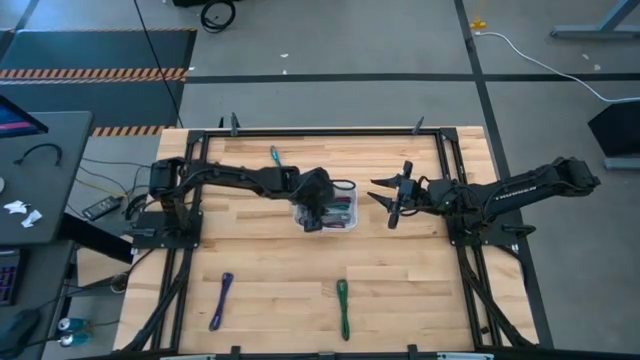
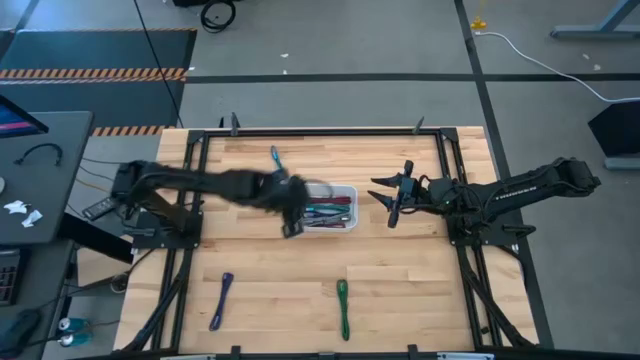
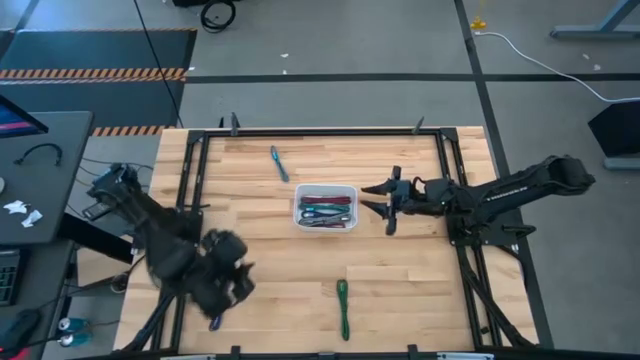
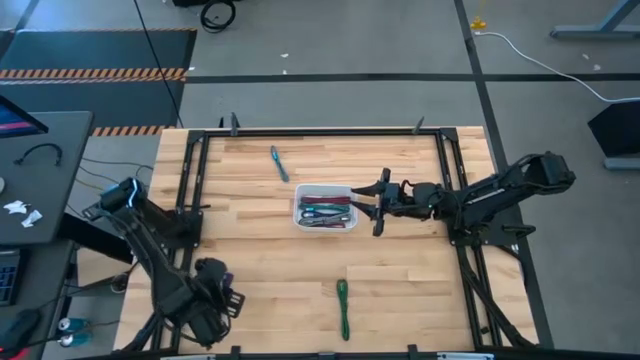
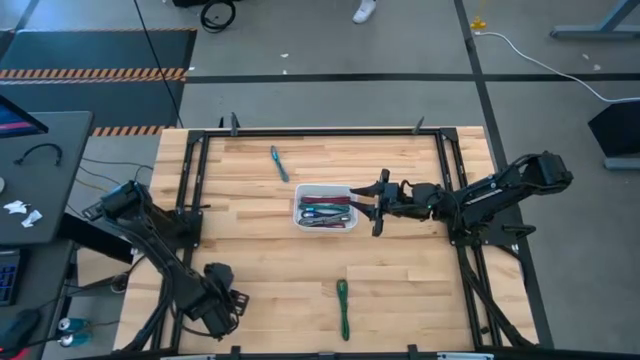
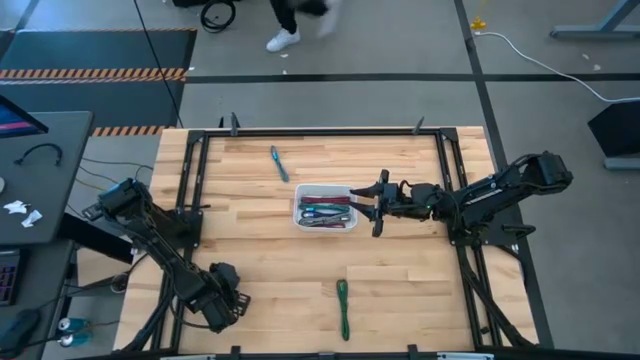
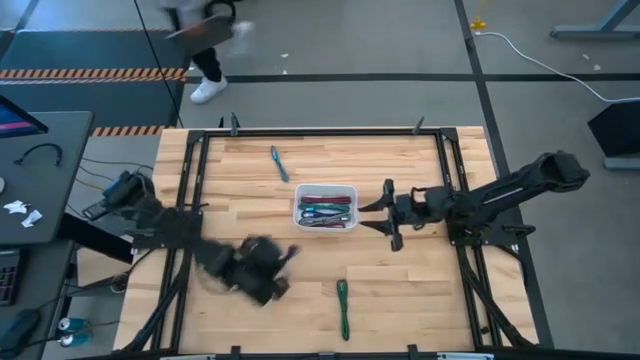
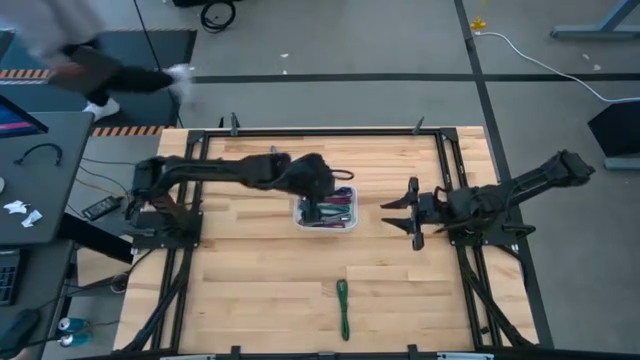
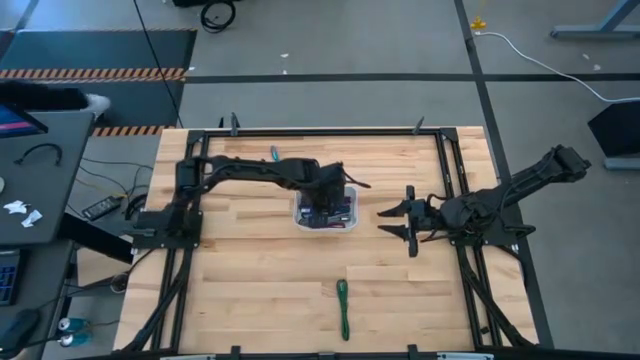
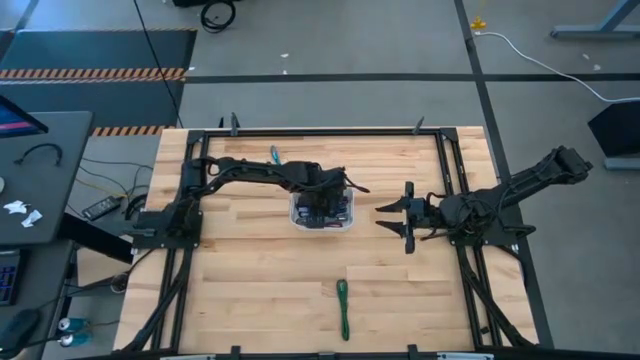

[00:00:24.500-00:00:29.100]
Task: Pick and place USB-C Cables
Put the black and violet charger cable into the white bin

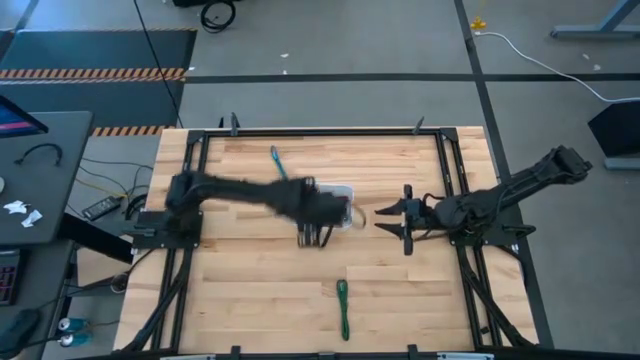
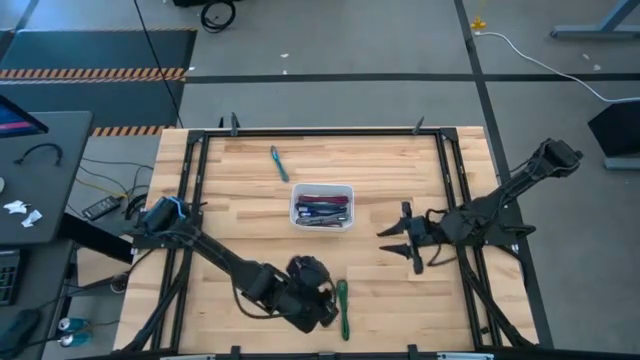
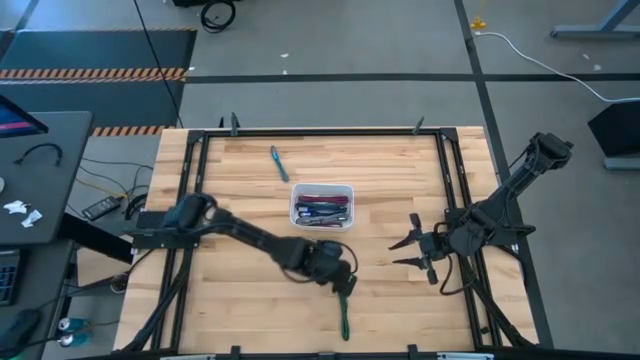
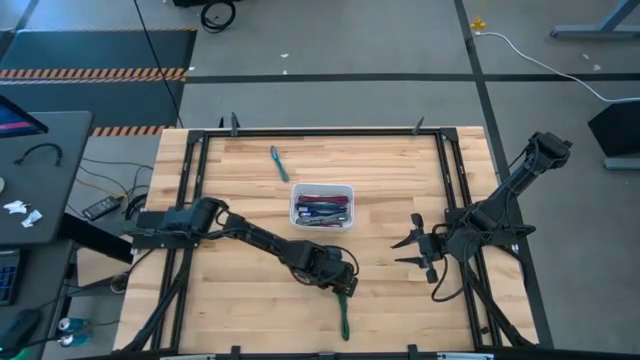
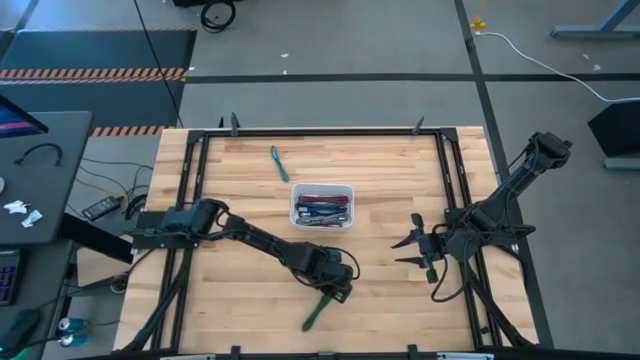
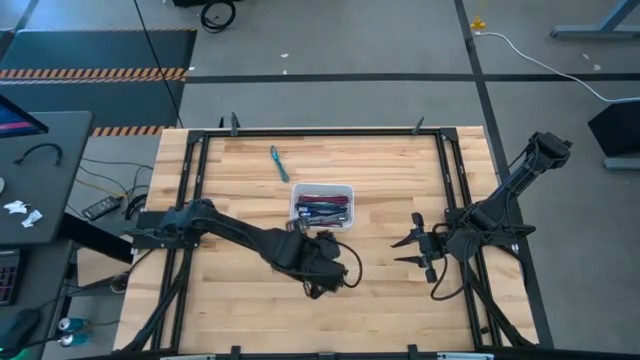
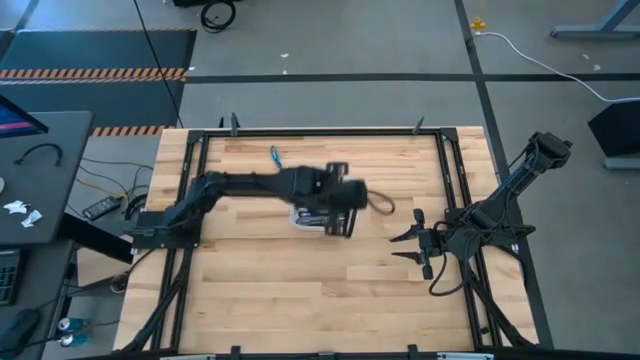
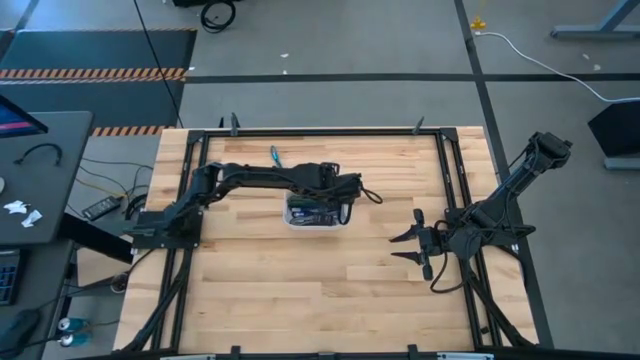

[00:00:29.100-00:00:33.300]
Put the black and green charger cable into the white bin

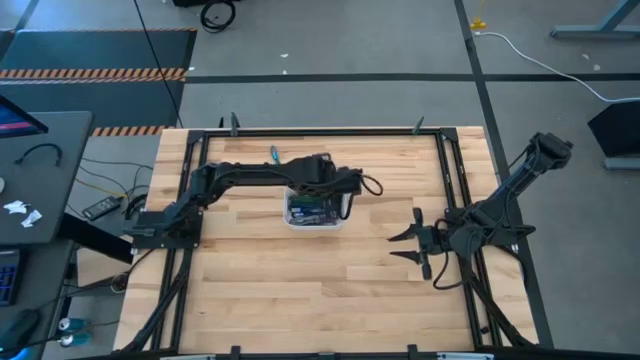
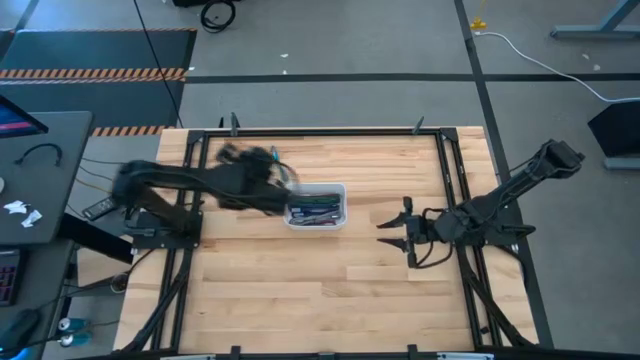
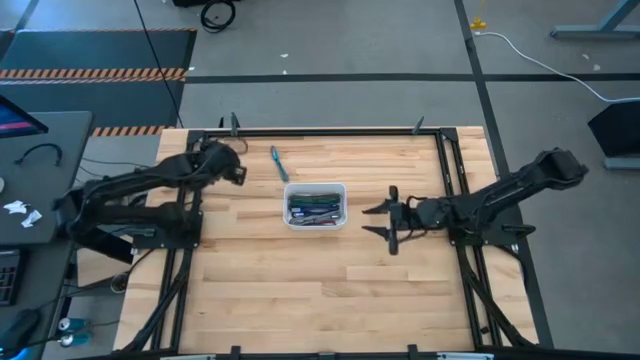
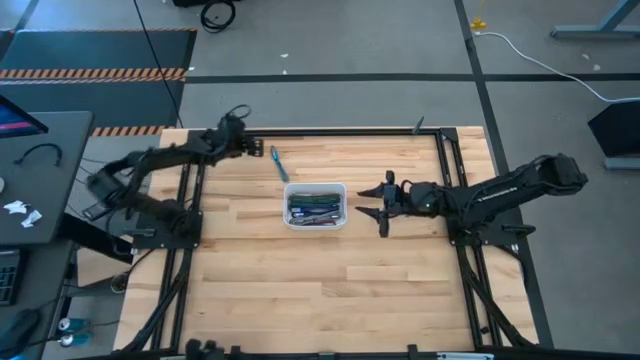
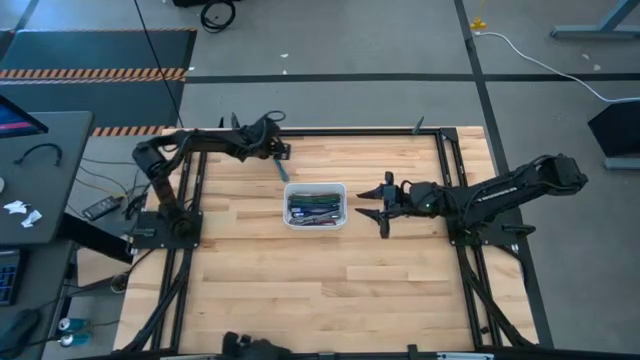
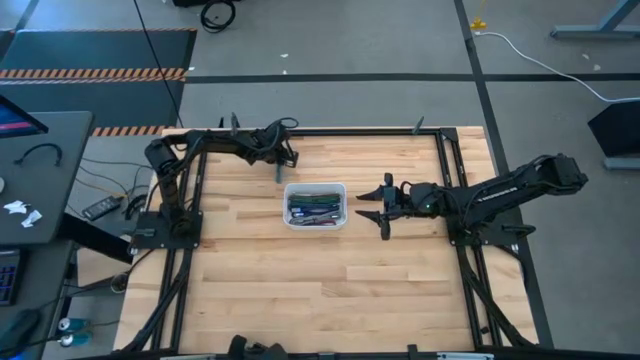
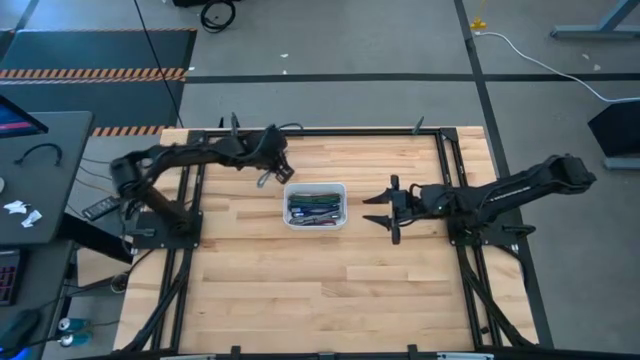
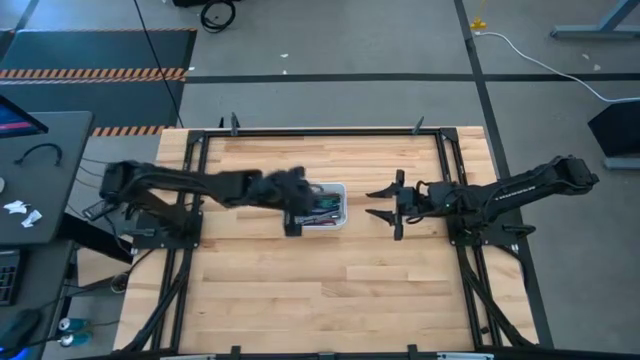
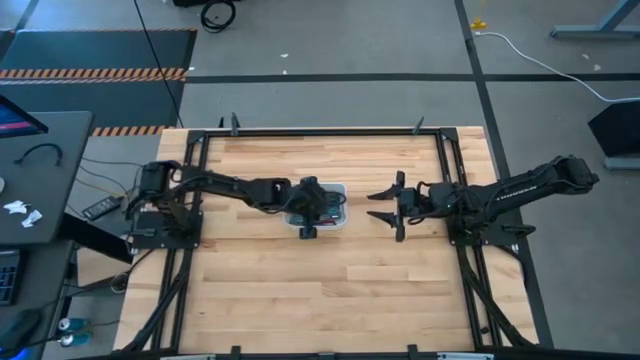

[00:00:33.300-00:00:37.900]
Put the black and blue charger cable into the white bin

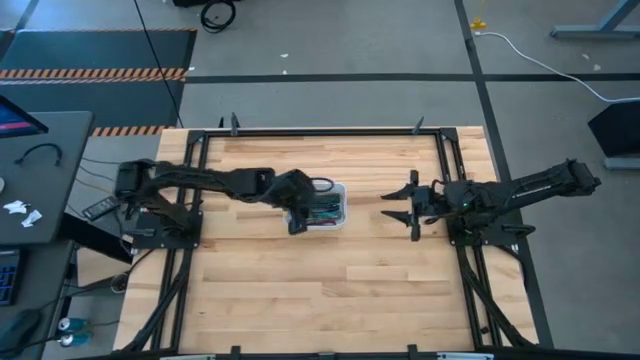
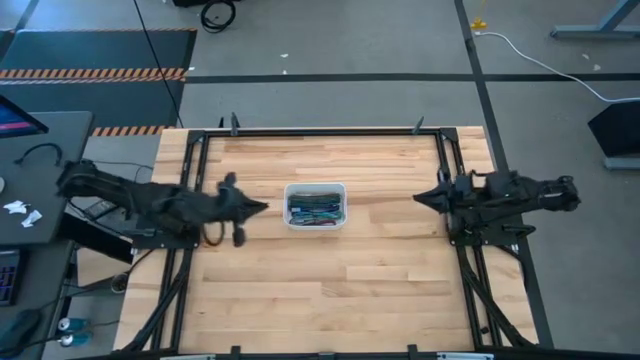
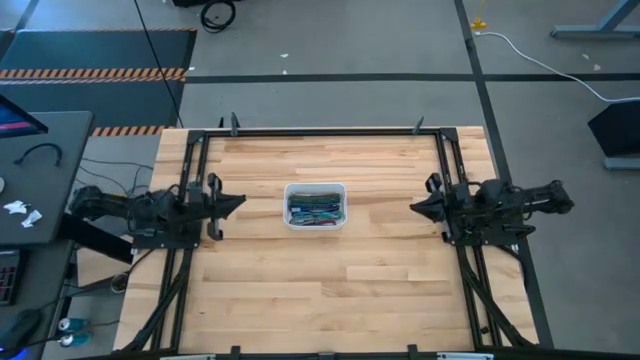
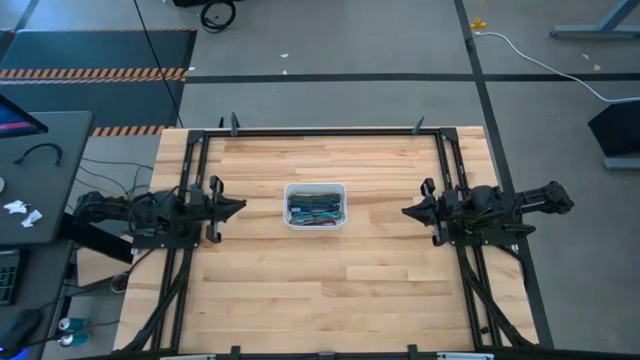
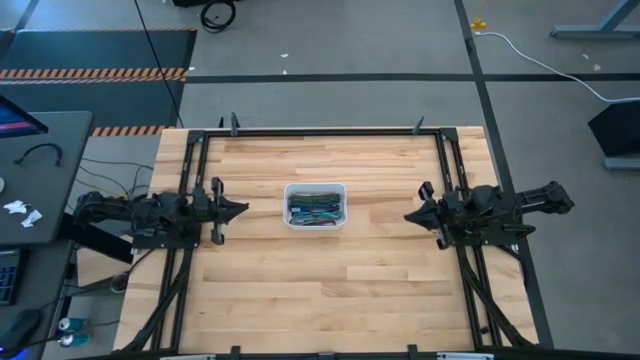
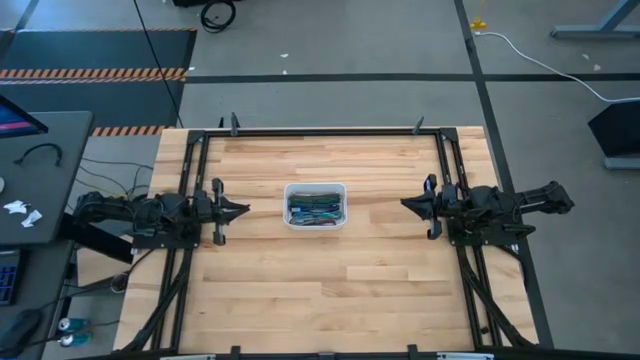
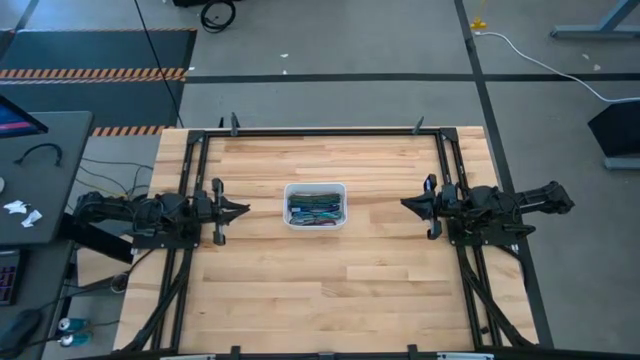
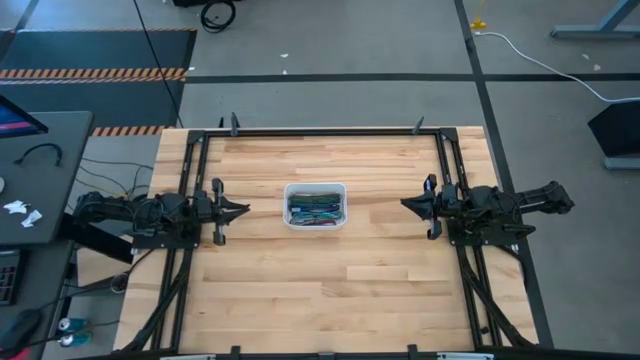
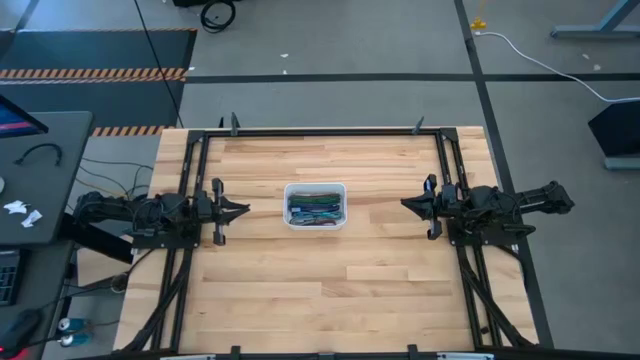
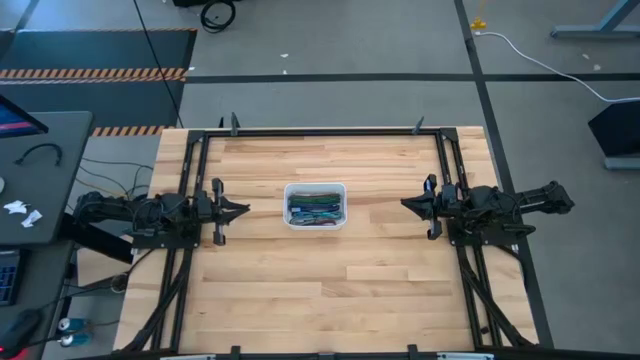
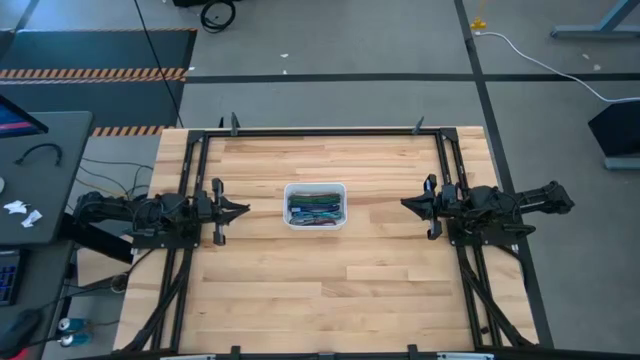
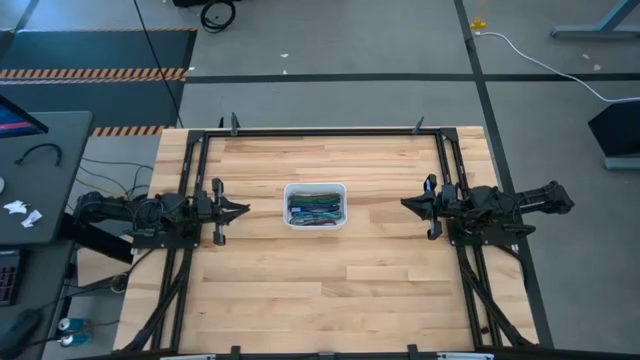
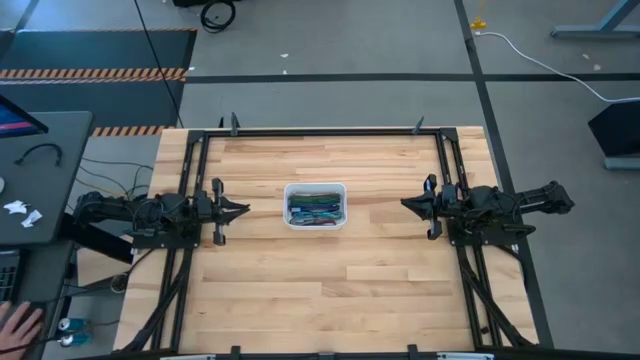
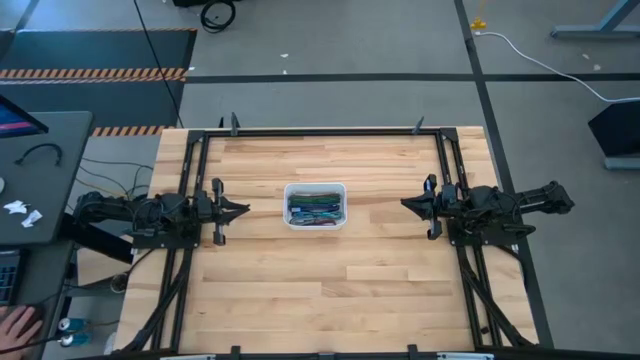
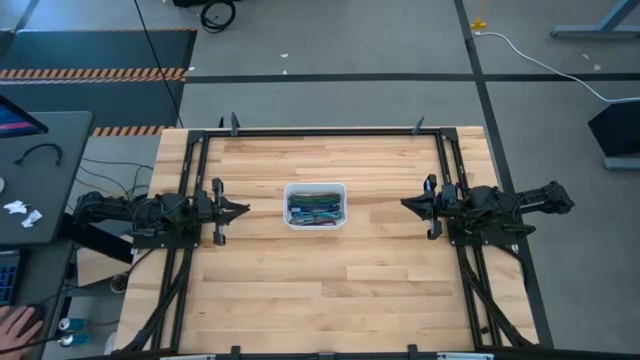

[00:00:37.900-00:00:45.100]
Return to Home Position
